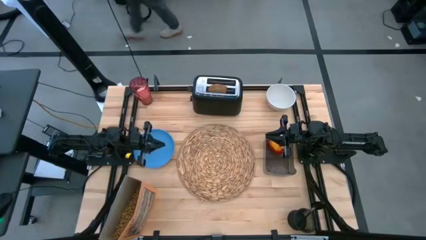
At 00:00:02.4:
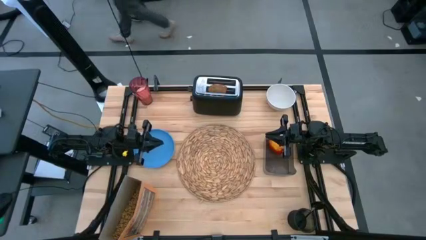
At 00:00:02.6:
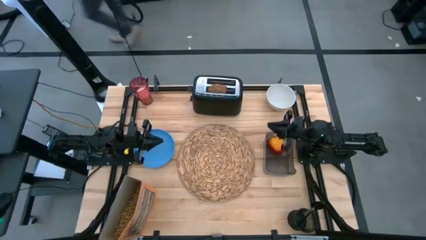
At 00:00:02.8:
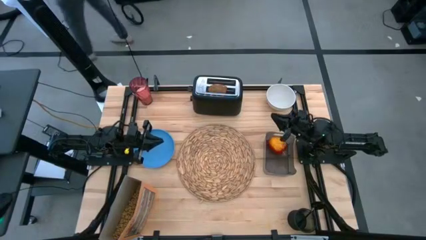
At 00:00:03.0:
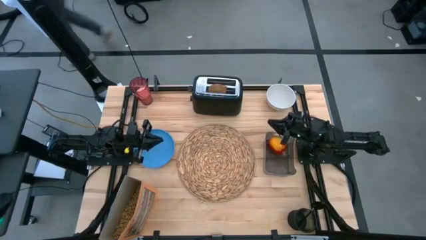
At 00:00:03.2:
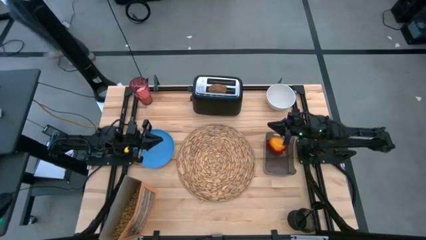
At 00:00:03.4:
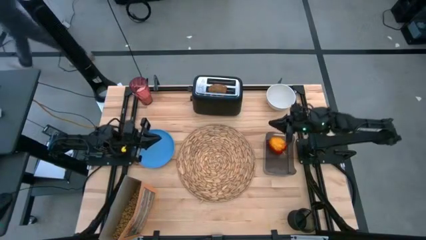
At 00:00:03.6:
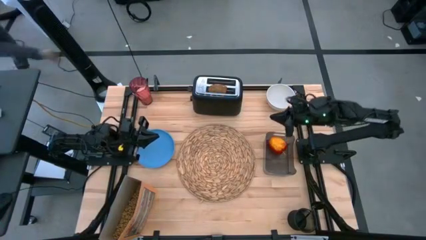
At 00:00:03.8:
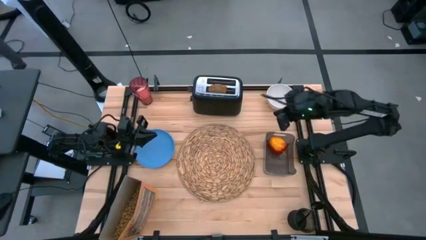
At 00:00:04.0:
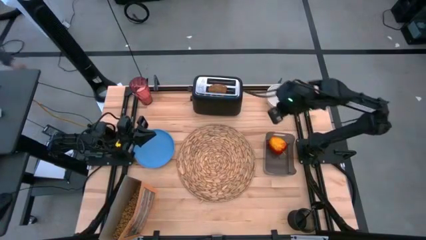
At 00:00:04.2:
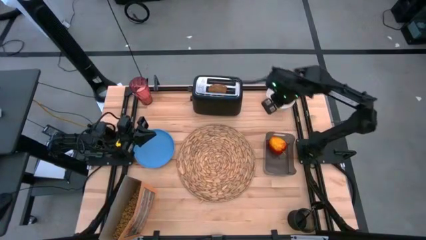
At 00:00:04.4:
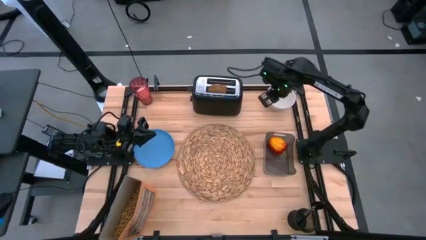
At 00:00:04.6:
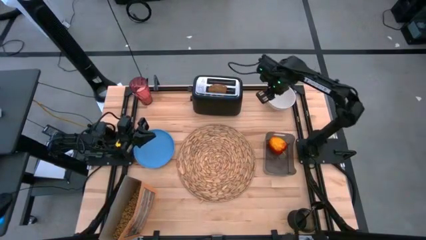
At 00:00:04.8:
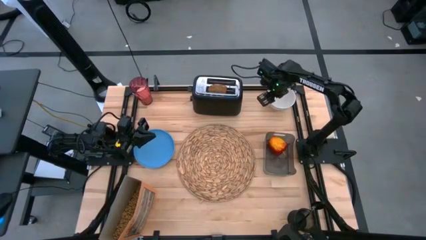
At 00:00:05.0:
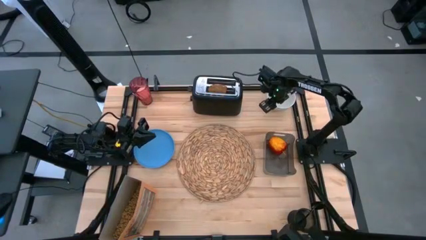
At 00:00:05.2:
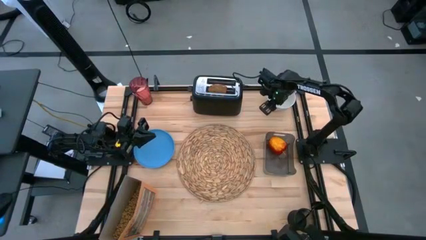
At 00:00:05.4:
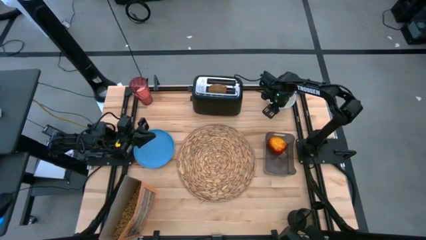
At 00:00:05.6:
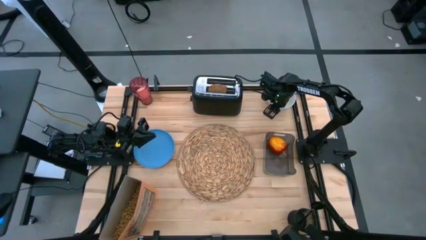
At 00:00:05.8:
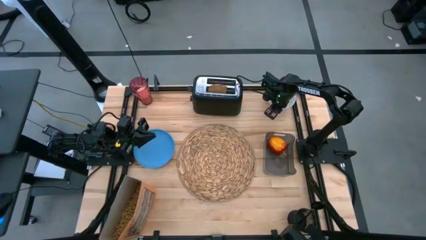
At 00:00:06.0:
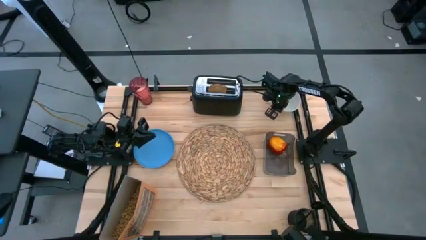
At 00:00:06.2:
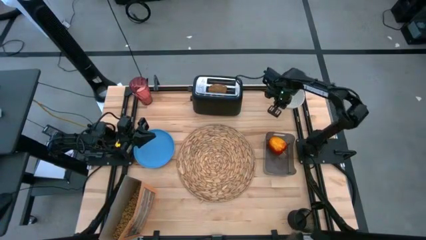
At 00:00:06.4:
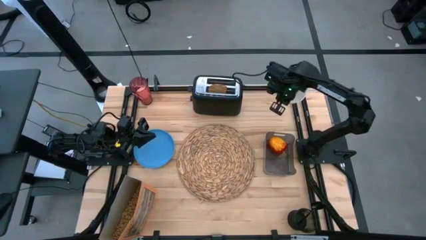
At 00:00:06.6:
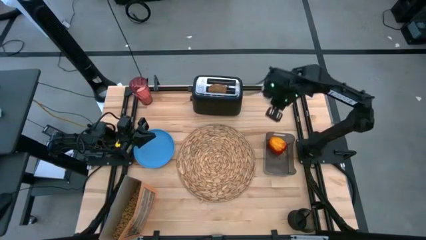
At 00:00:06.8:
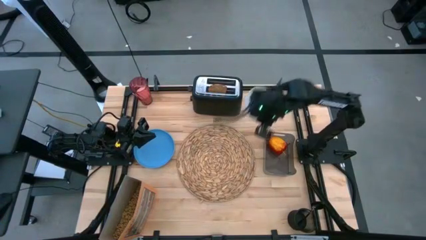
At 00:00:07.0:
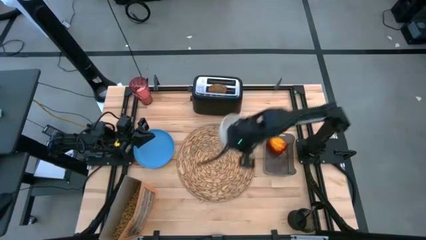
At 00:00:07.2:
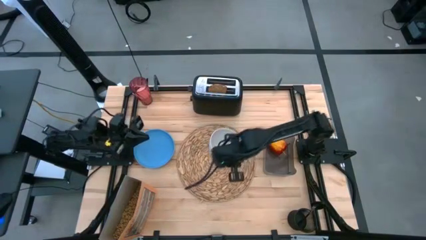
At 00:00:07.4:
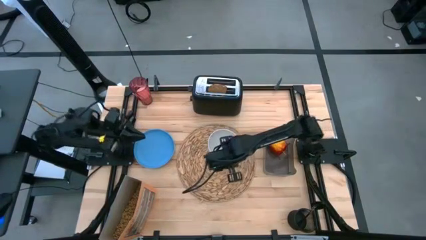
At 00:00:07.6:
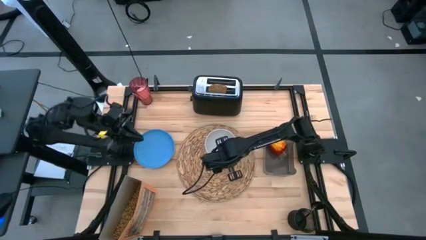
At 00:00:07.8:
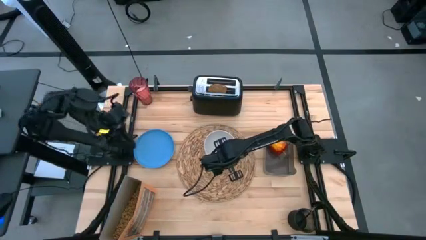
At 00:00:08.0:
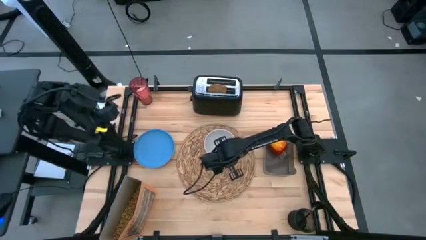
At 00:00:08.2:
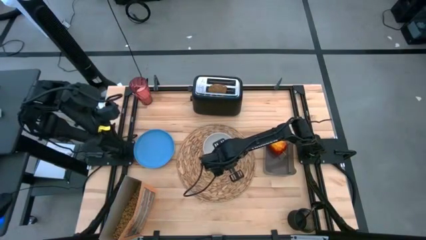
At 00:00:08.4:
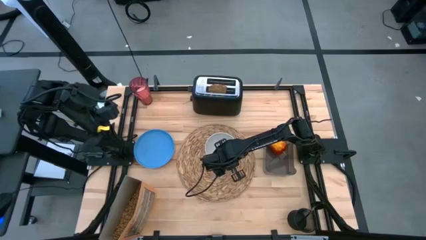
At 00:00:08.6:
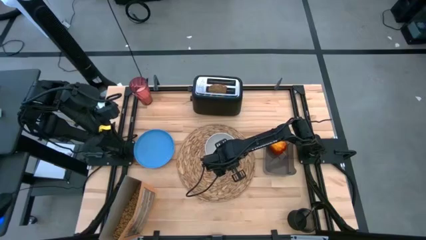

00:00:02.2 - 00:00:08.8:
Task: Arrange a breakfast setting
Put the bowl on the table mat

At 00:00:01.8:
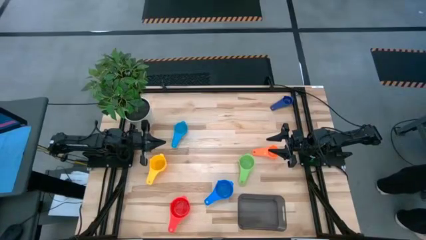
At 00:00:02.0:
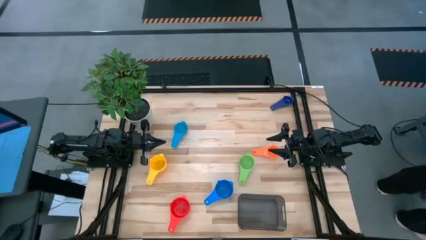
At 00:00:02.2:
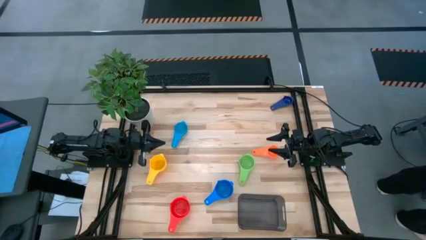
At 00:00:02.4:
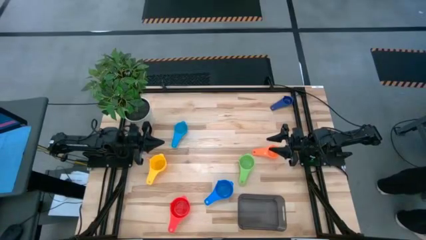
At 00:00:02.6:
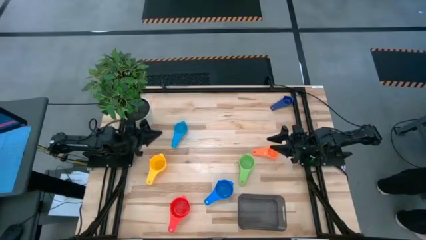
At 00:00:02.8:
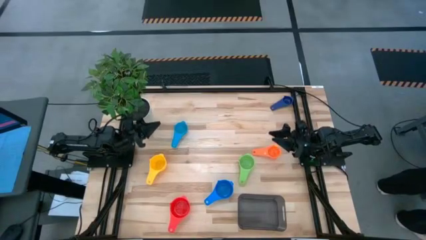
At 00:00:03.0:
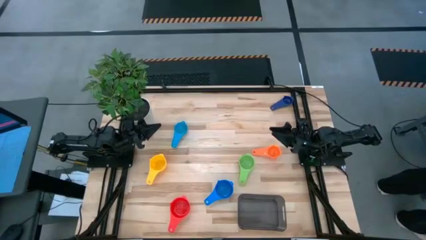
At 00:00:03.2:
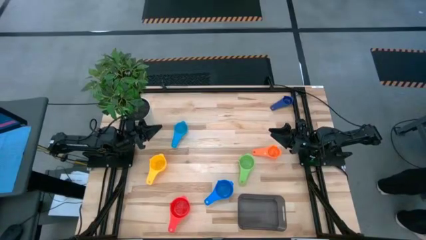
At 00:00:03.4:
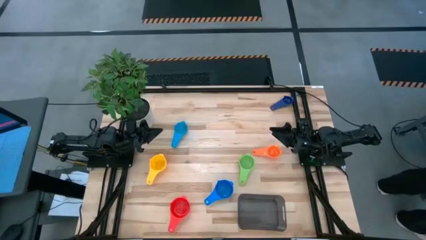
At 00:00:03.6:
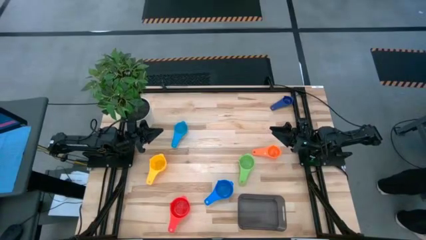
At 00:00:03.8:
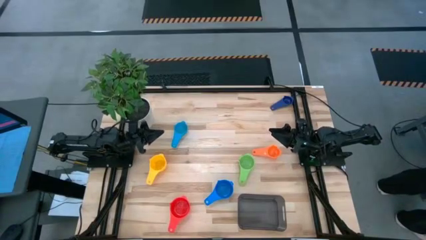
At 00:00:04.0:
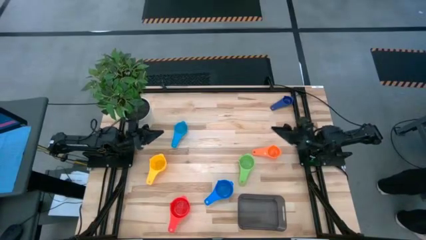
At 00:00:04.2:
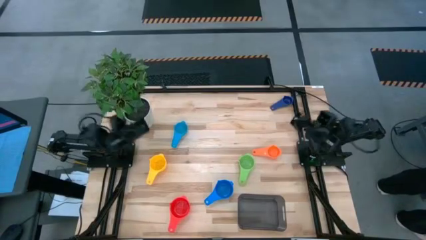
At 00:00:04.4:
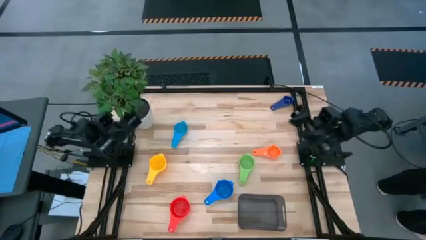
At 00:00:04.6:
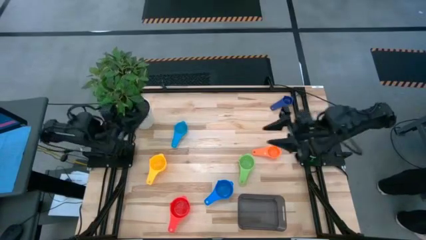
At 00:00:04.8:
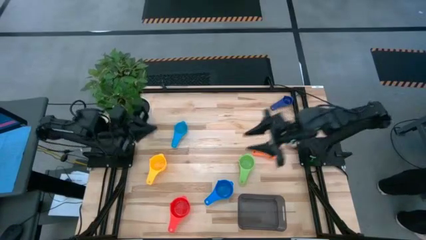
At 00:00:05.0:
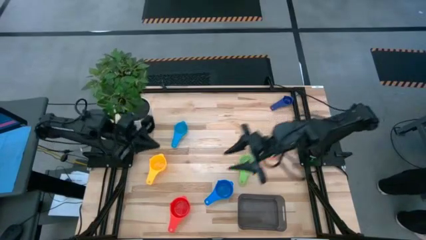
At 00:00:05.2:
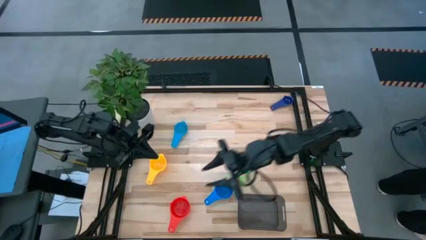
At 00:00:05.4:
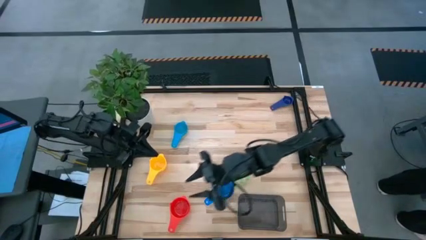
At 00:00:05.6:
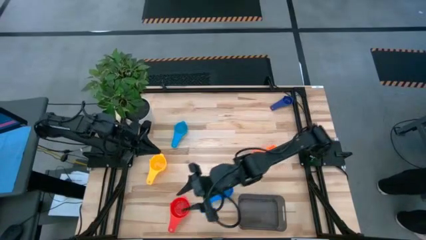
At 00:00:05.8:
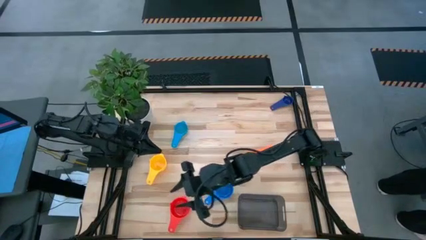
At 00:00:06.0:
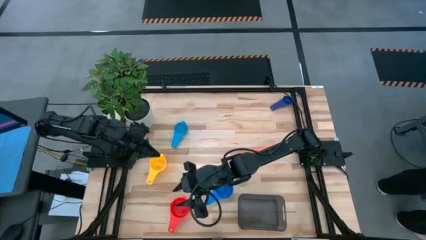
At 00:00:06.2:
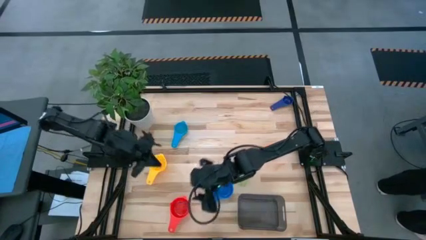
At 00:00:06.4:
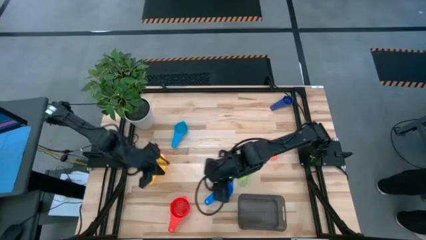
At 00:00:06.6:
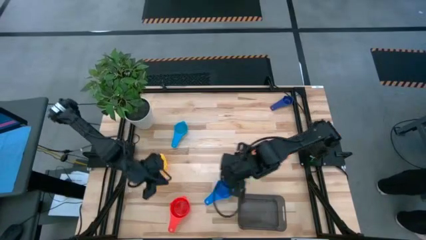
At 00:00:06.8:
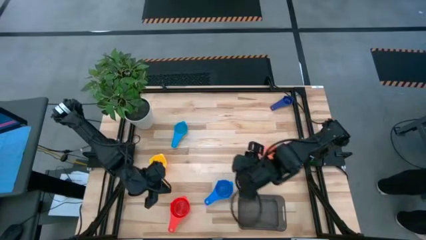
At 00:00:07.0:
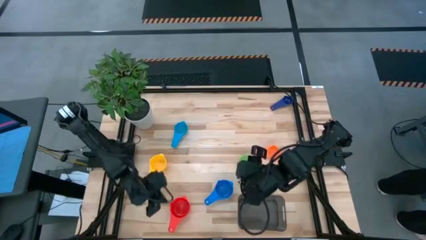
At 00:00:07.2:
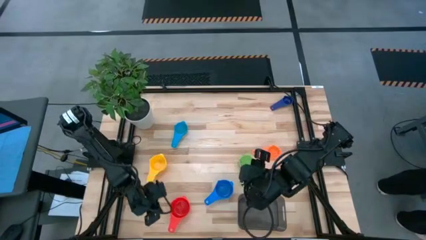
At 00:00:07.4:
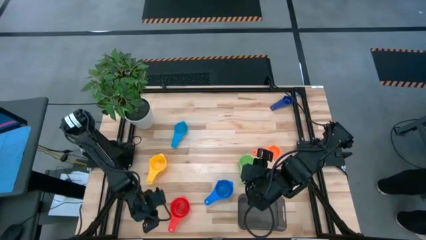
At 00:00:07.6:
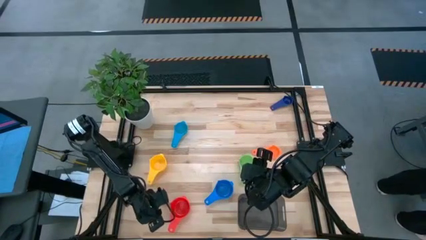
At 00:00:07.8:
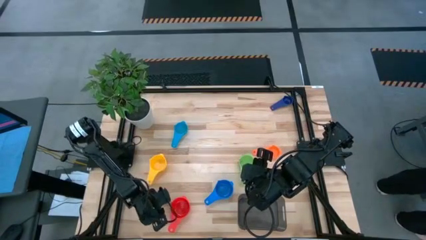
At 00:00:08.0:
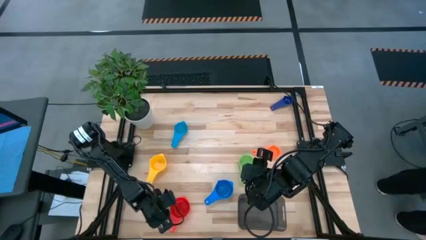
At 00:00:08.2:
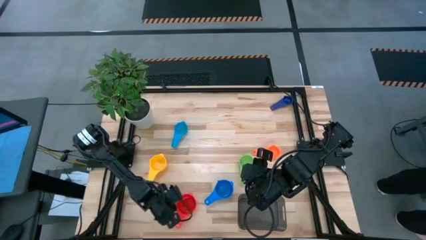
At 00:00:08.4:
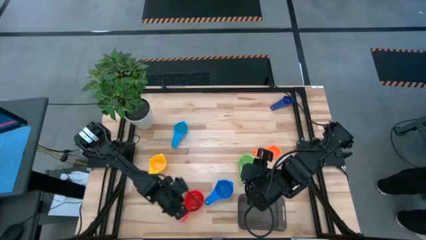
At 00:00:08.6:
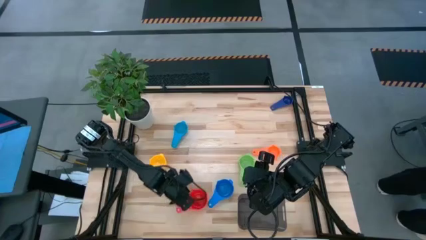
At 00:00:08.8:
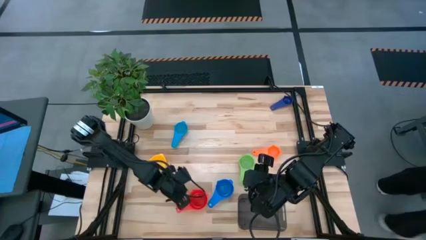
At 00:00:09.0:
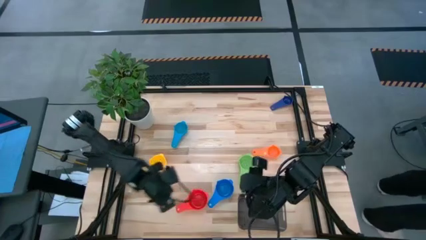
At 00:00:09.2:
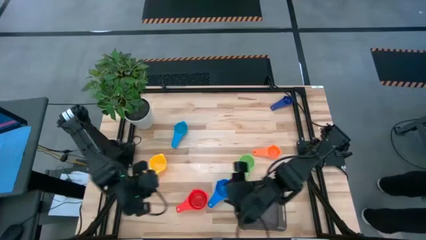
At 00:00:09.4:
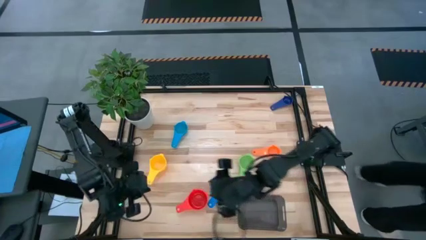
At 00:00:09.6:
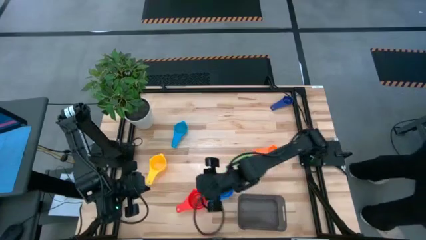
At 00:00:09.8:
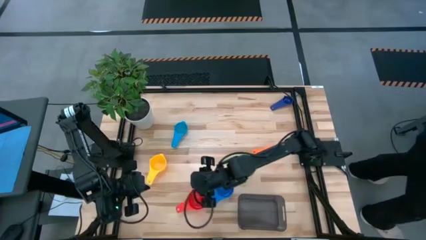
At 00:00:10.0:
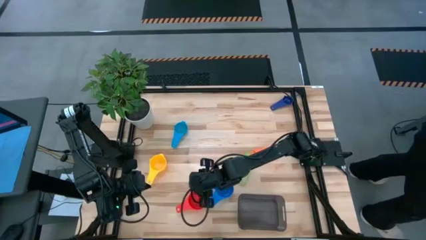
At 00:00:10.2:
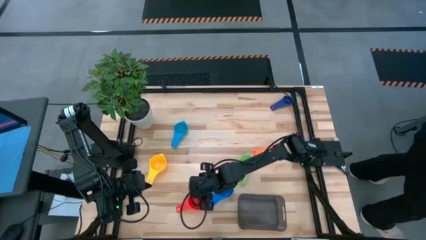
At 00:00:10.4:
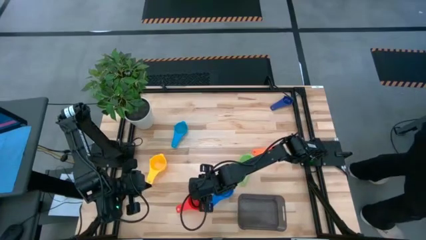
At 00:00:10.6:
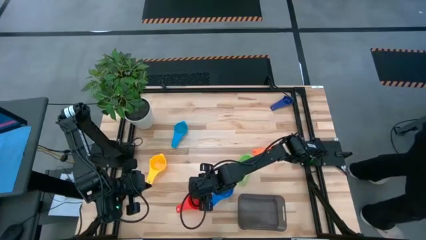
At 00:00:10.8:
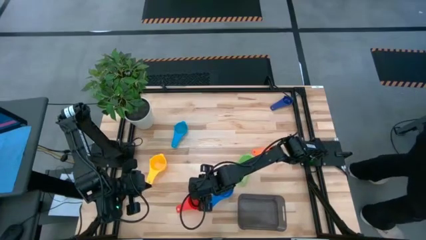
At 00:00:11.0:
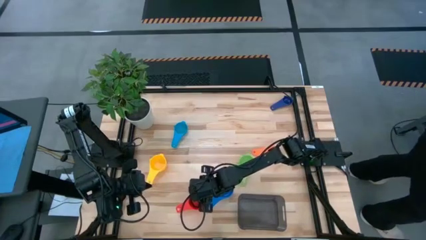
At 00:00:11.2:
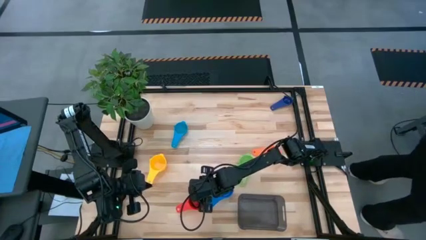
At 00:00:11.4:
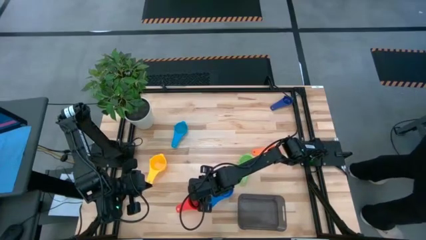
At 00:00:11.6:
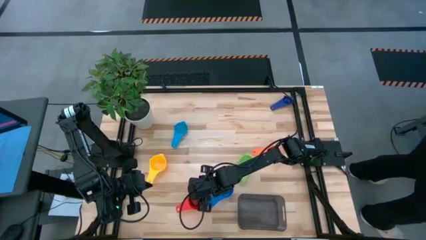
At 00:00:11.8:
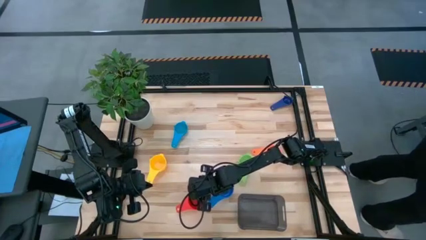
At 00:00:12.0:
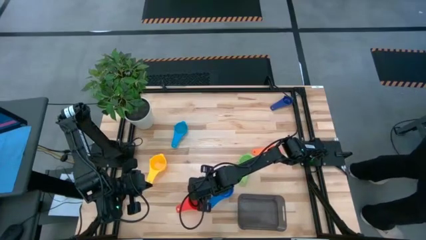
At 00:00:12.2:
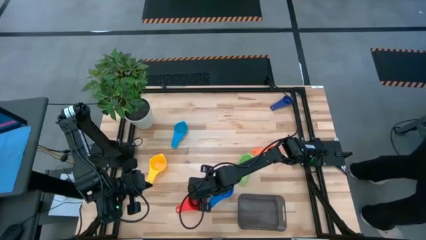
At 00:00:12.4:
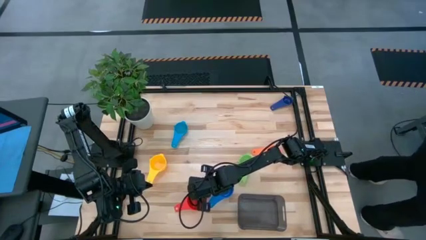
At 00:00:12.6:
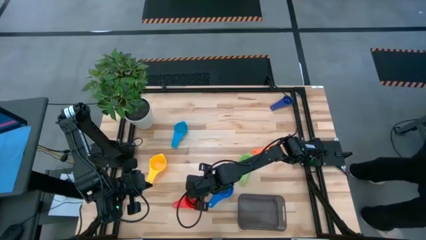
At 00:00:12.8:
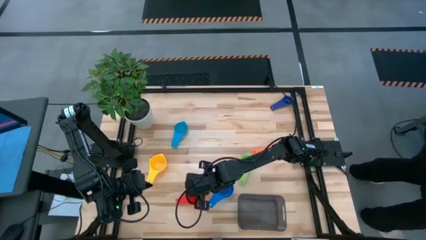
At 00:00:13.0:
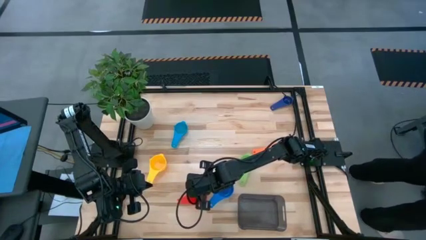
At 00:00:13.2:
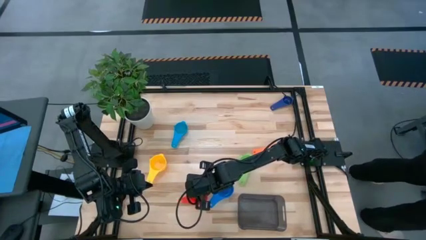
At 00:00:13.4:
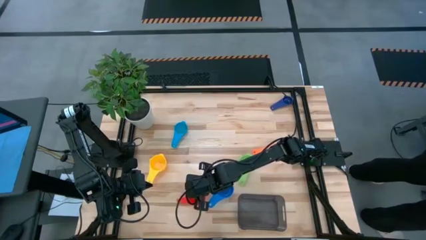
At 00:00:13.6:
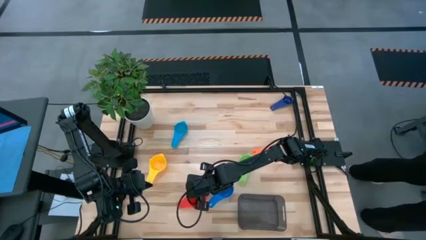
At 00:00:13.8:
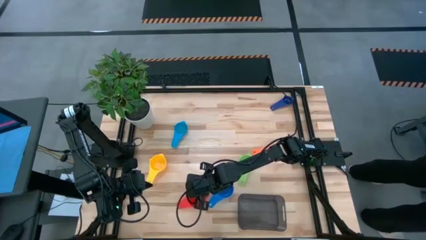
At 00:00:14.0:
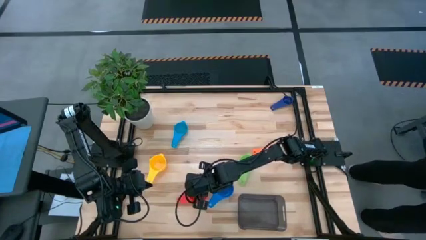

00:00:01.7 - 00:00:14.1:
Task: Nest measuring cups in basket
Put the red measuring cup into the transparent black bin
